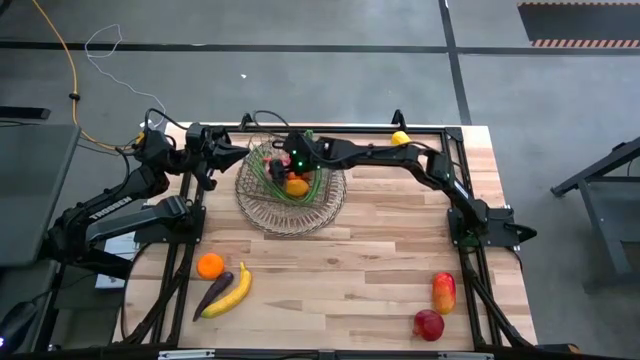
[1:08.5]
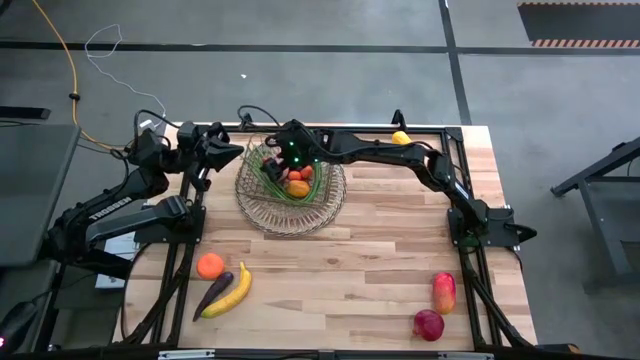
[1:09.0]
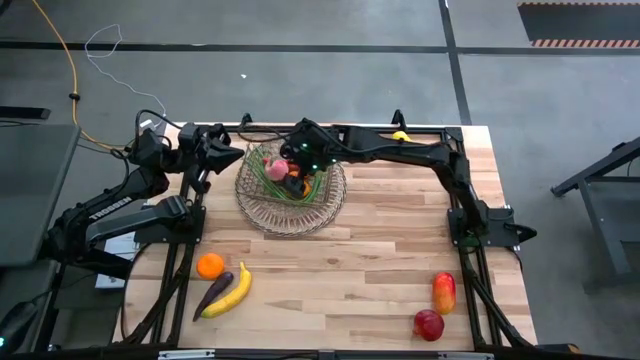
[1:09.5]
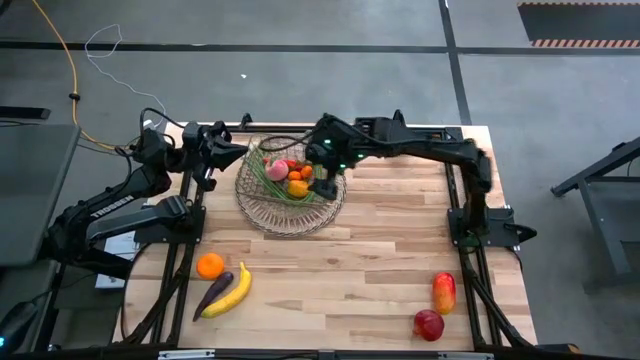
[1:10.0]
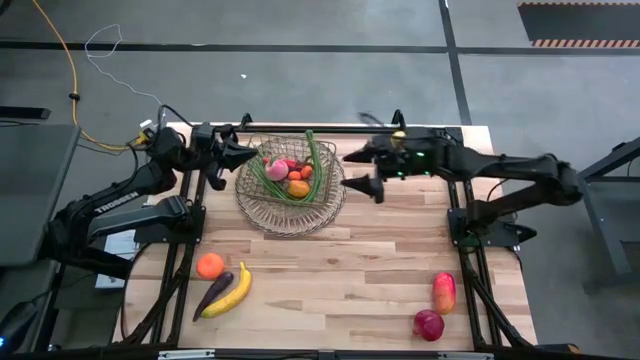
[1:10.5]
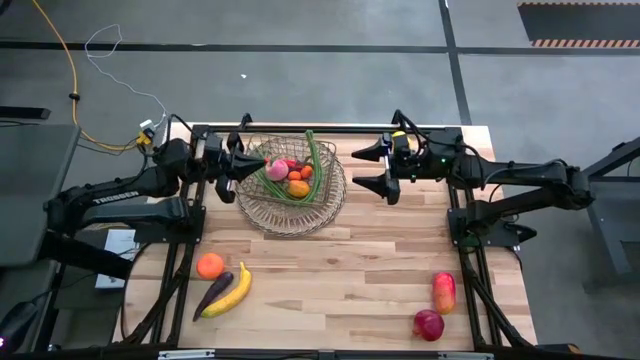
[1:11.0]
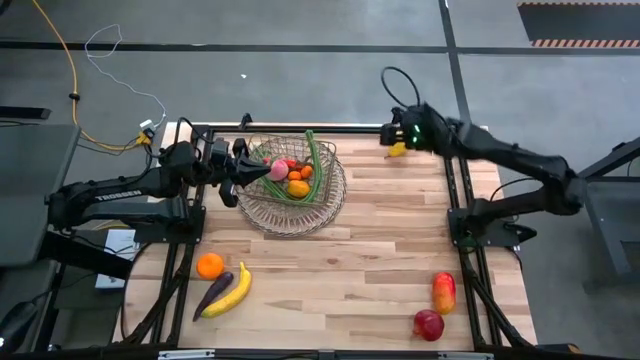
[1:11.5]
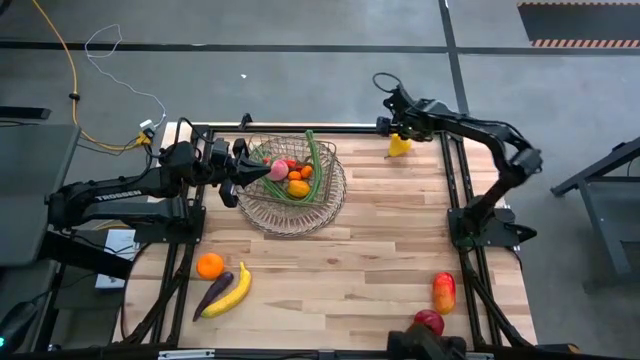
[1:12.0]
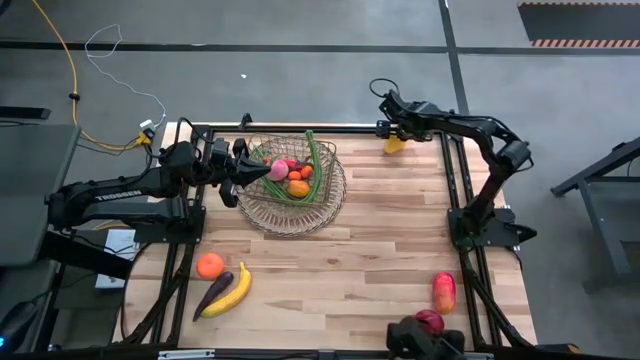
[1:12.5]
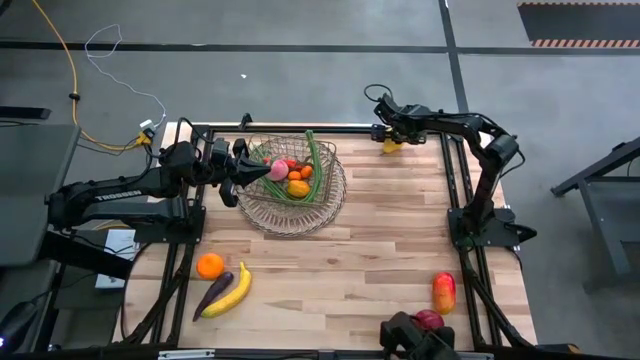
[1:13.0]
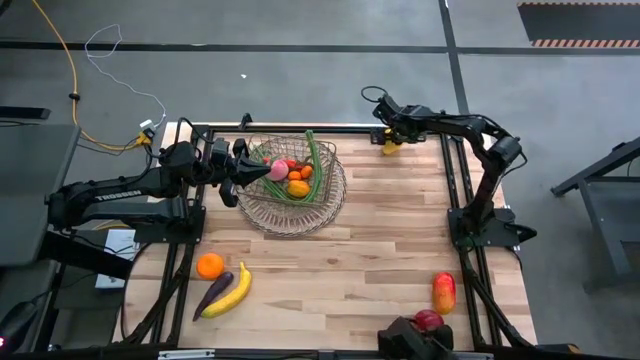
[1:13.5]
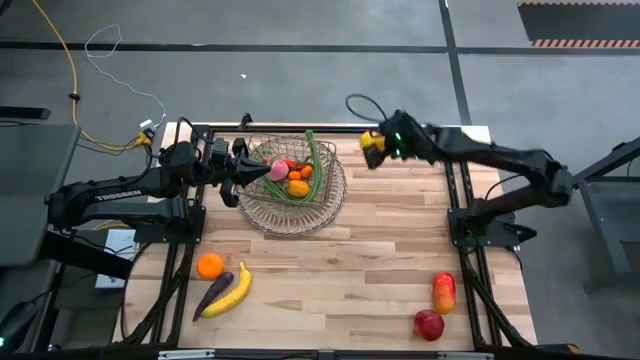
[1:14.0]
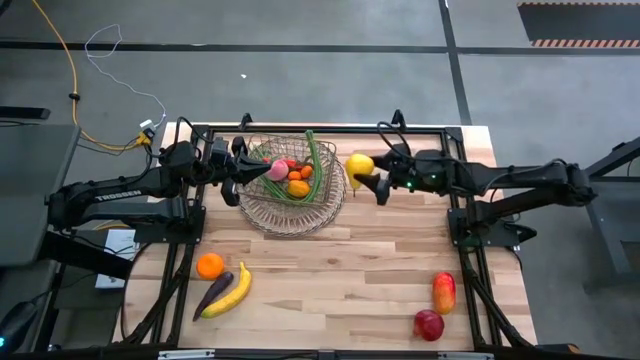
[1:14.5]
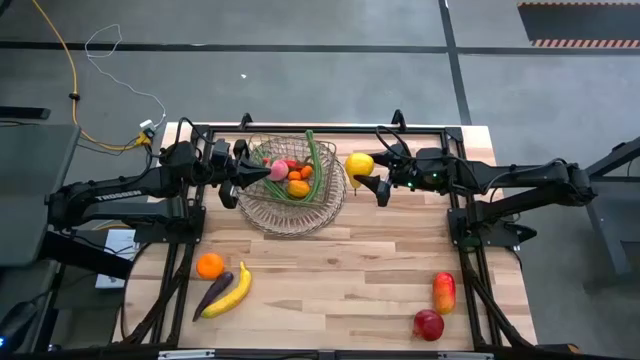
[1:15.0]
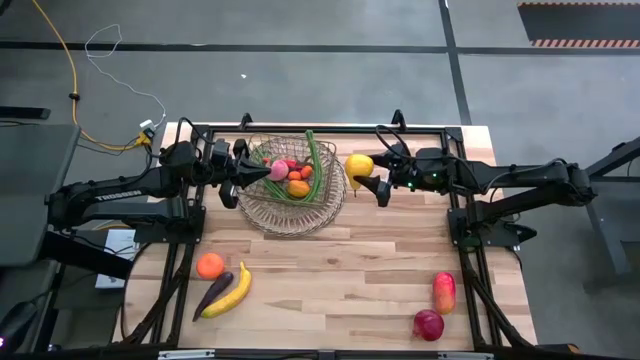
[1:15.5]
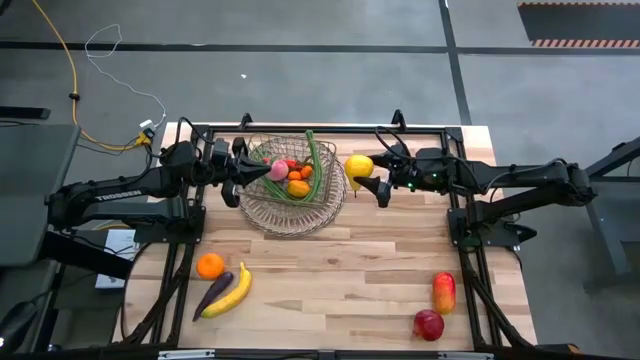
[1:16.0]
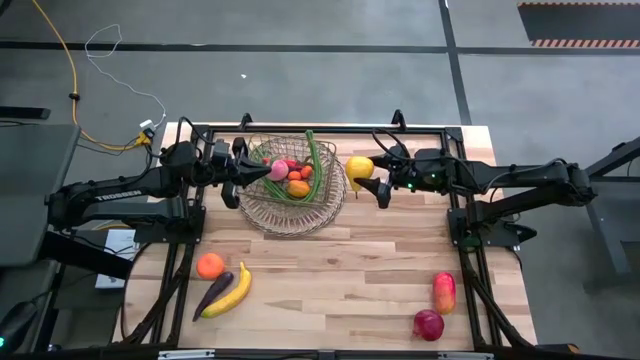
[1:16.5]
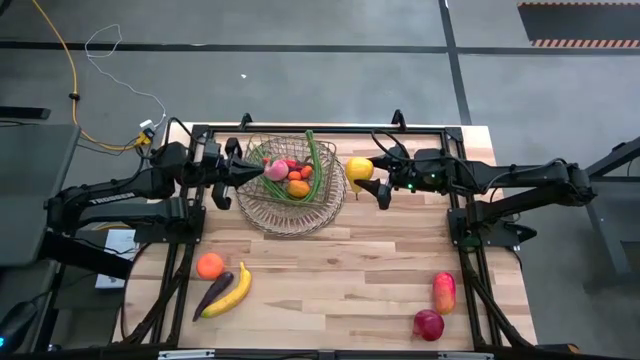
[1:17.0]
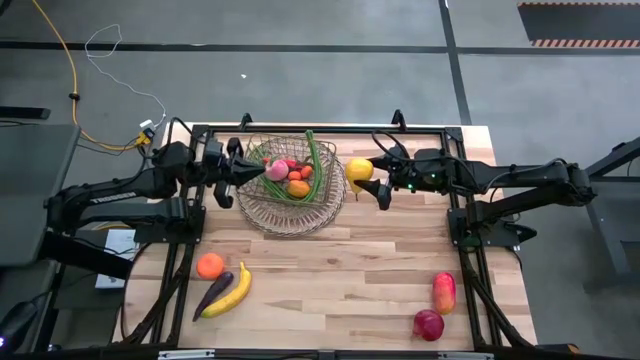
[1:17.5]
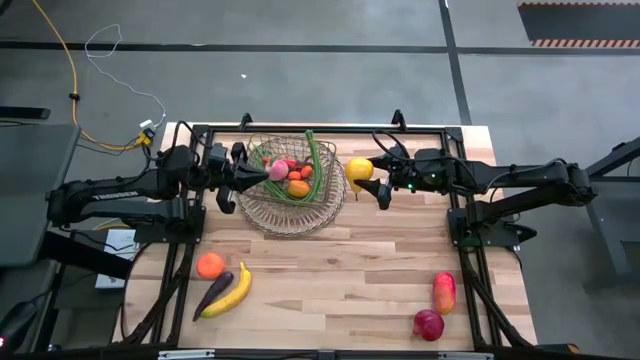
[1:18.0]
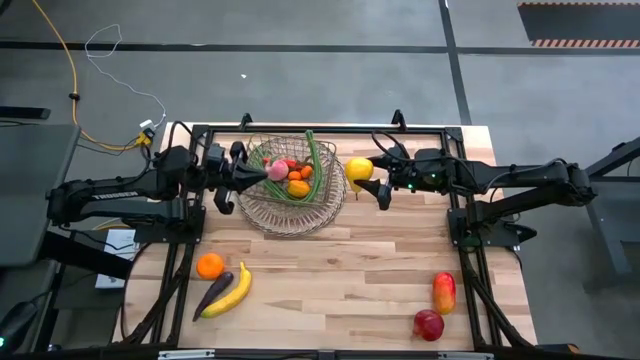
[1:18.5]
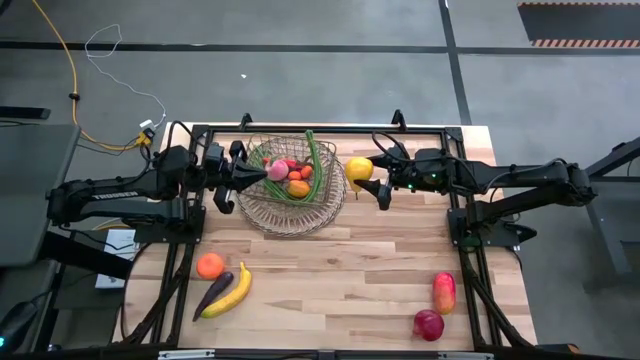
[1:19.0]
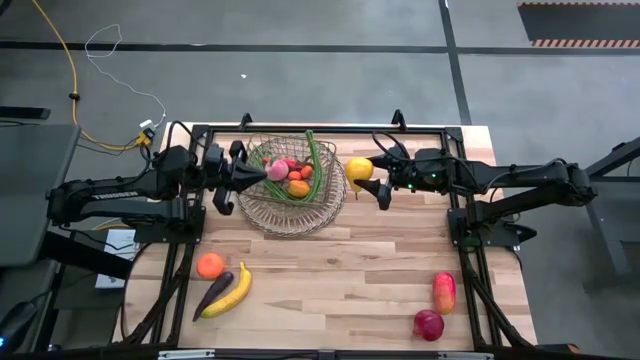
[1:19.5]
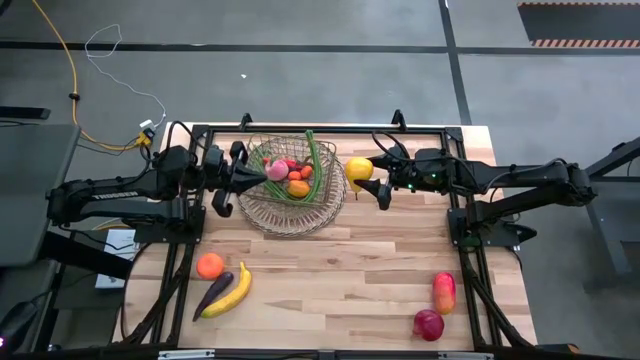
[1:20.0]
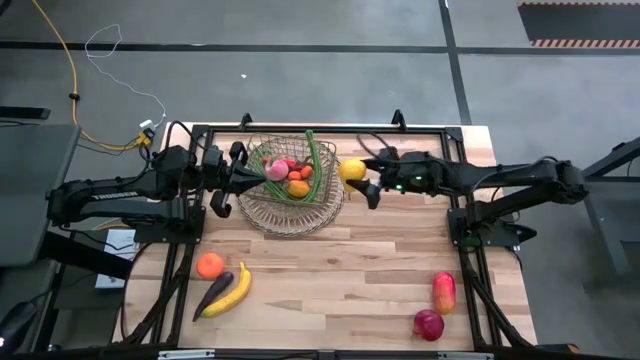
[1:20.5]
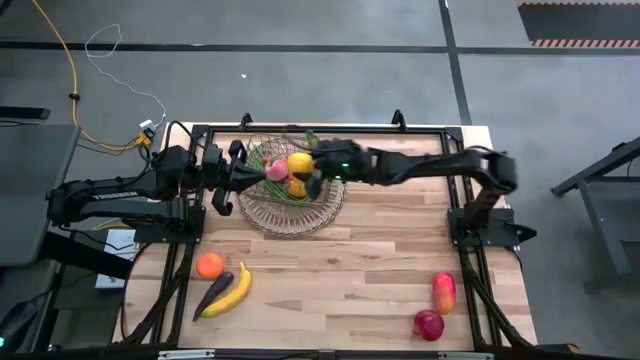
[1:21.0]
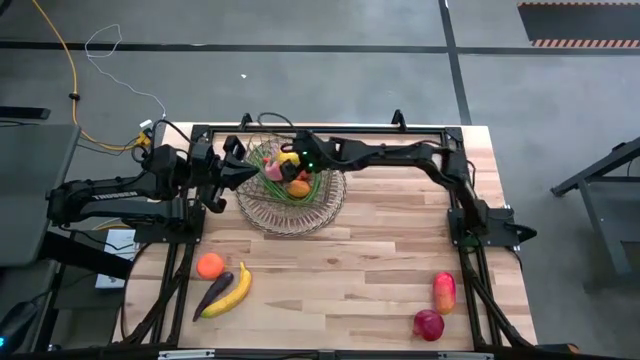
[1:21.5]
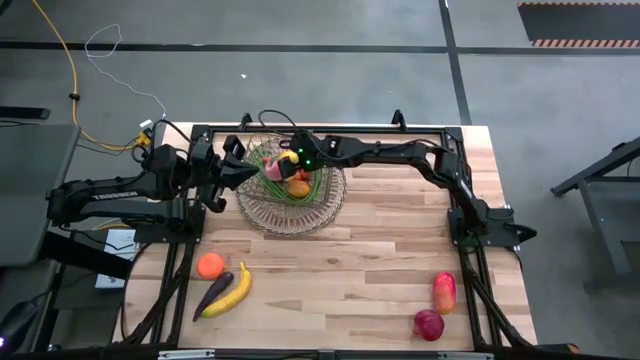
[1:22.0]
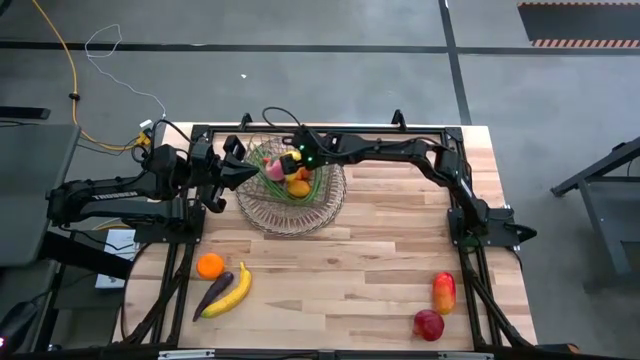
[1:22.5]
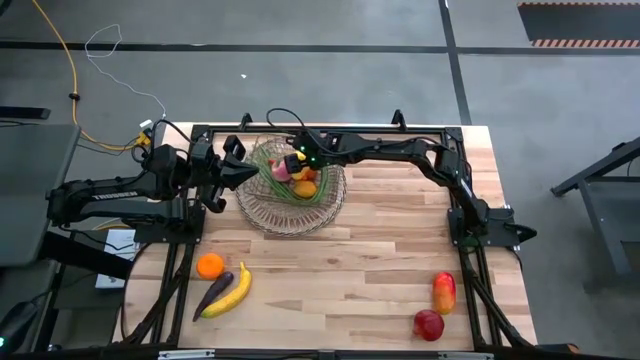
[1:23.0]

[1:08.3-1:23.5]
Task: Build produce basket
Put the yellow pear into the wire basket

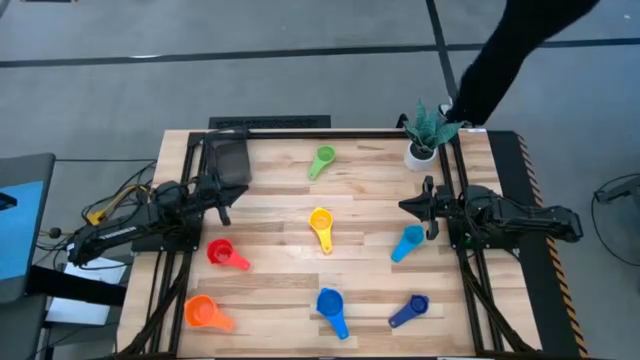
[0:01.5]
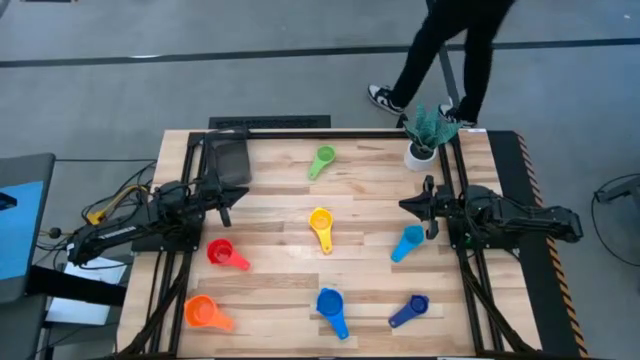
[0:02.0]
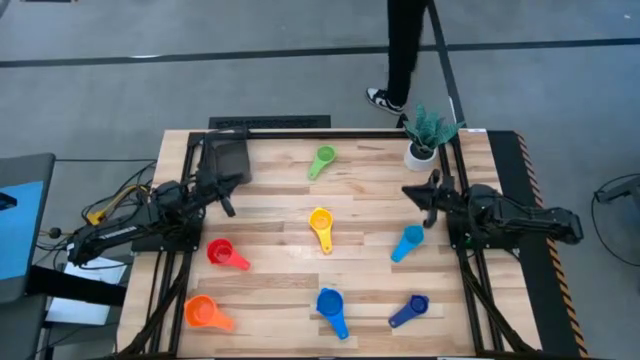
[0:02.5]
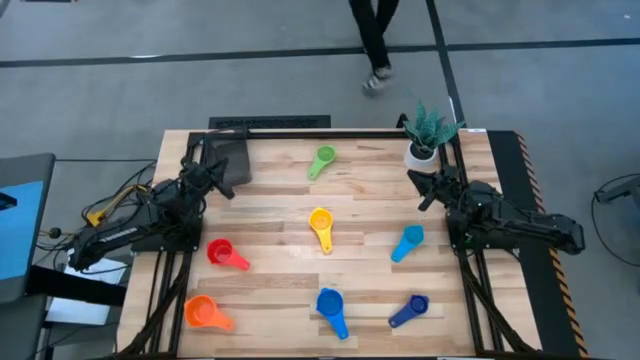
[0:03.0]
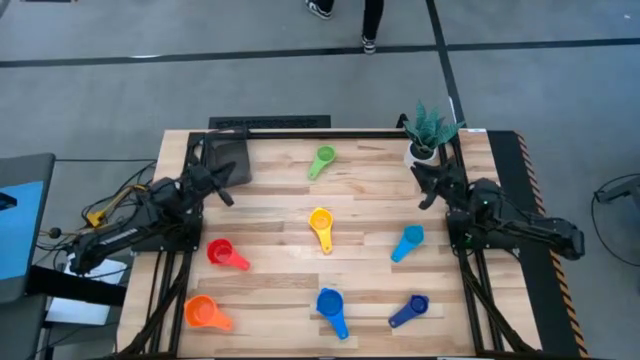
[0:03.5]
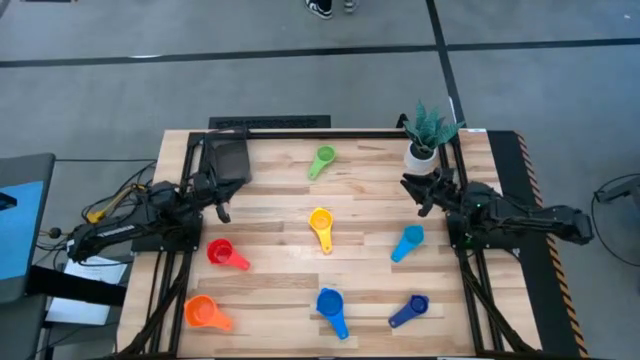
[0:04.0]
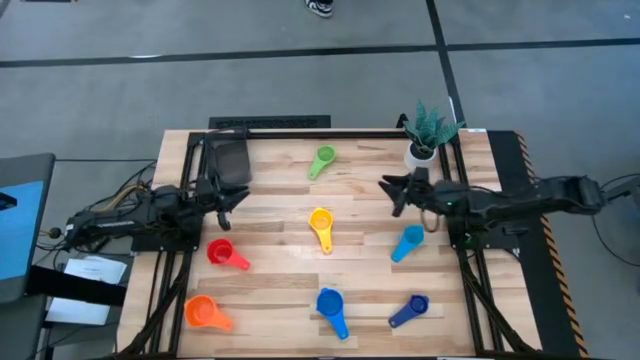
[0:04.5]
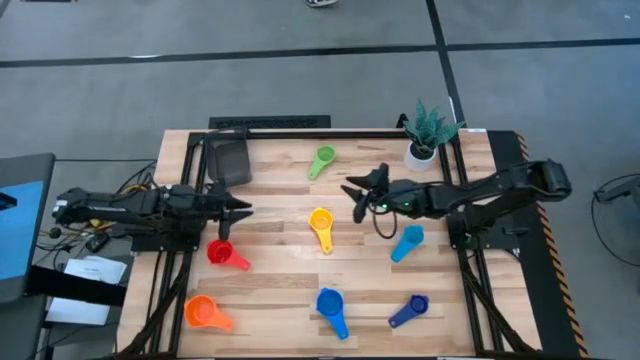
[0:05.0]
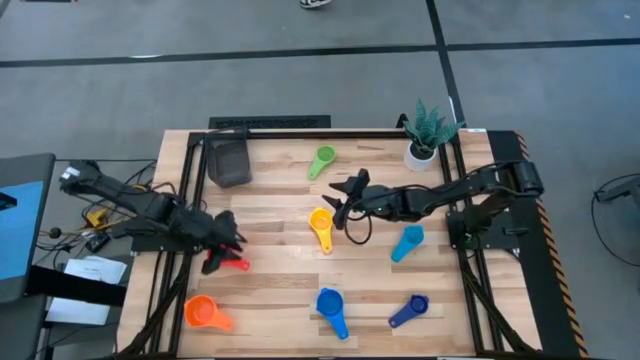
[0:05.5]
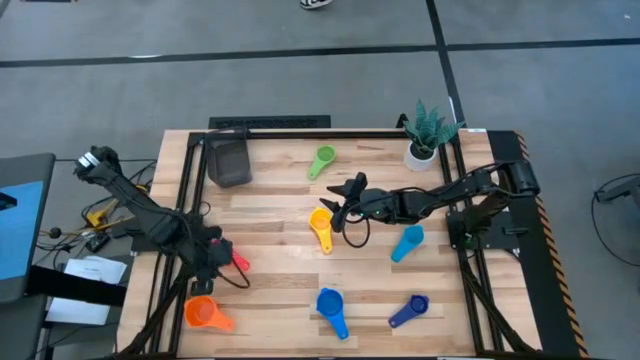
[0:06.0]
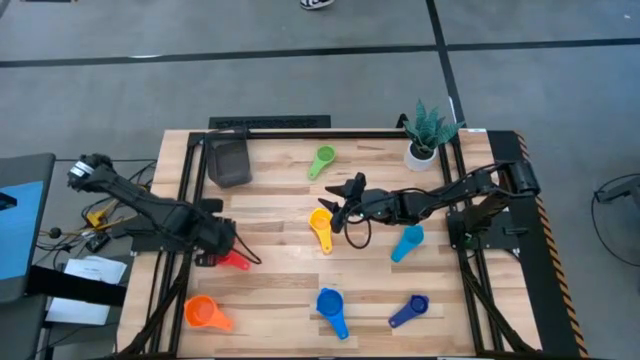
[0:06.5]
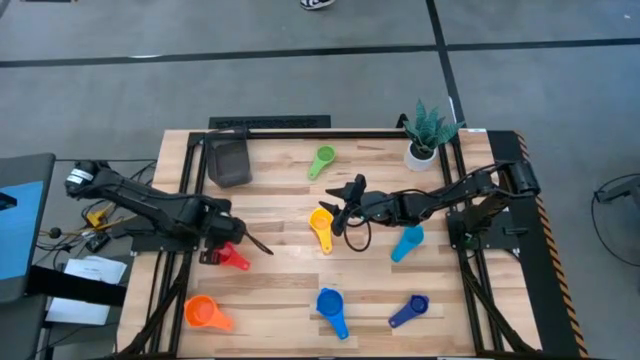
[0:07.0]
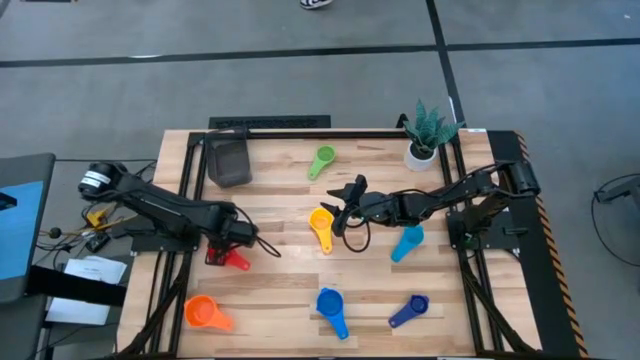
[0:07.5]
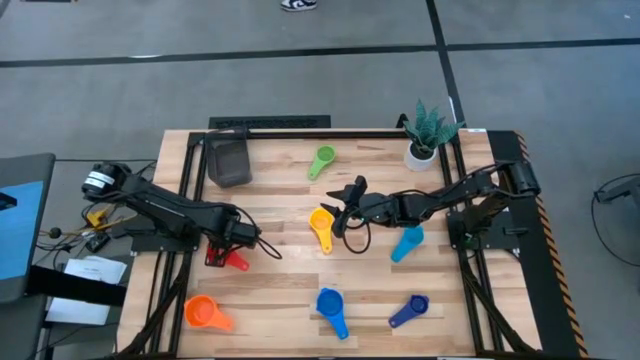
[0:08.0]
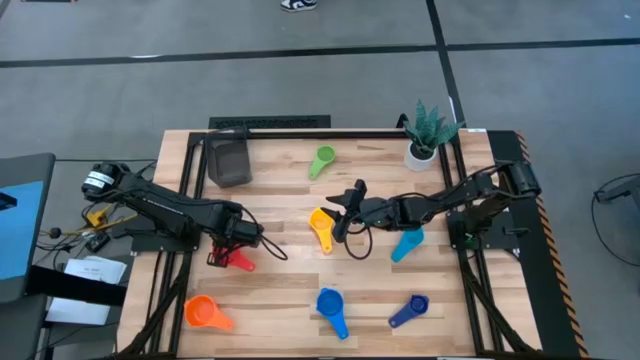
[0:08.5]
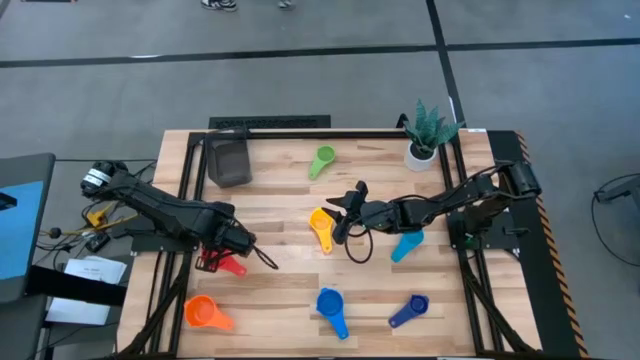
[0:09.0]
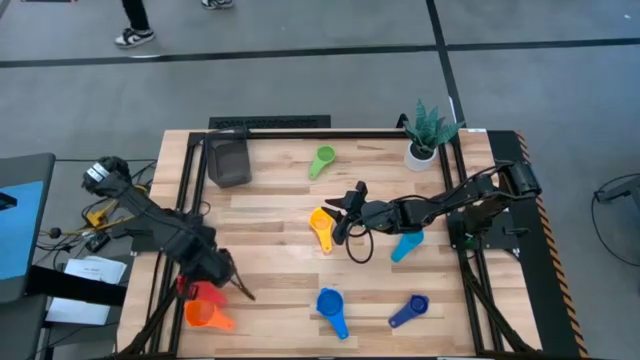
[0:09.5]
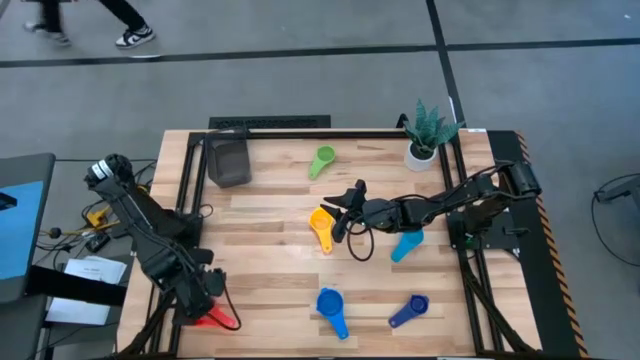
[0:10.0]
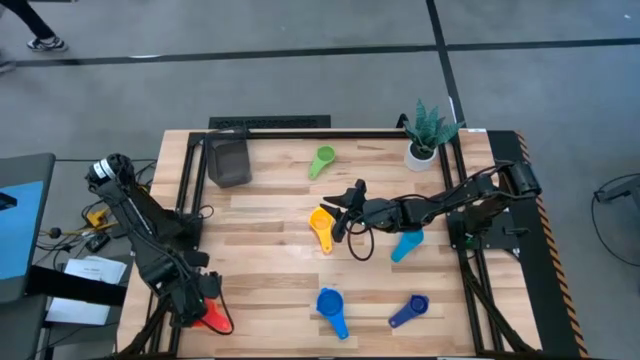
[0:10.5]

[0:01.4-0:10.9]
Task: Nest measuring cups in basket
Stack the red measuring cup on top of the orange measuring cup
